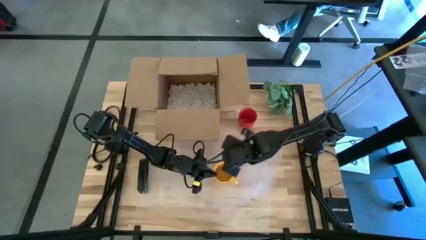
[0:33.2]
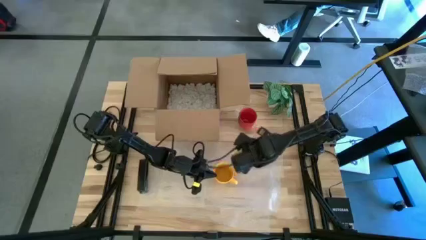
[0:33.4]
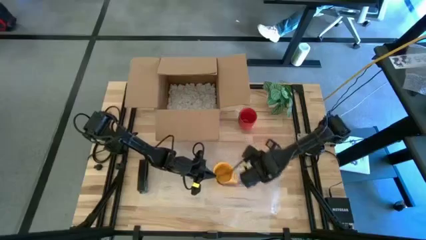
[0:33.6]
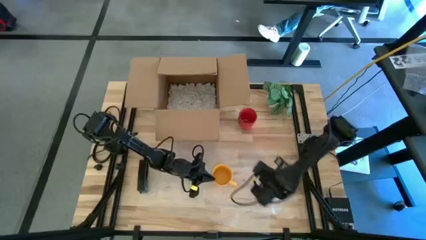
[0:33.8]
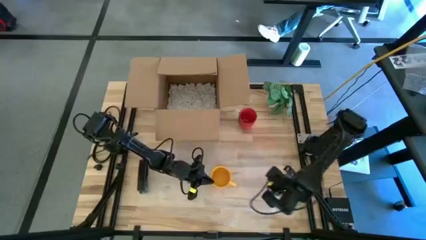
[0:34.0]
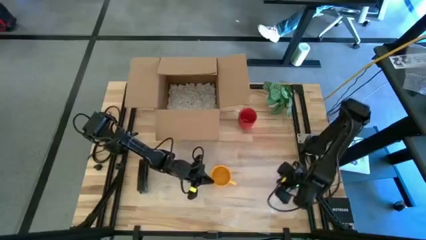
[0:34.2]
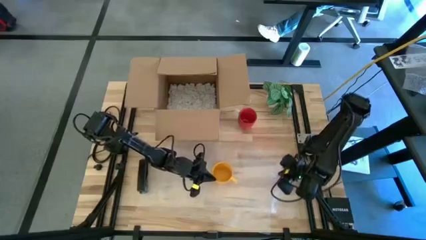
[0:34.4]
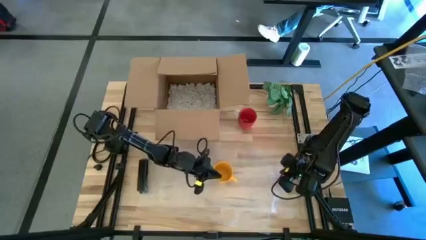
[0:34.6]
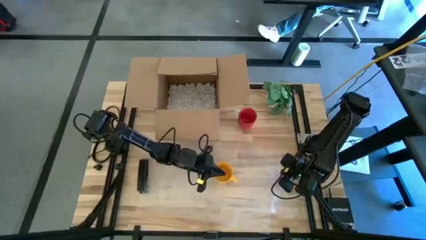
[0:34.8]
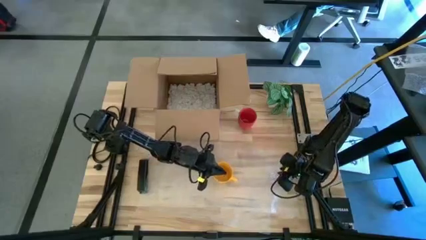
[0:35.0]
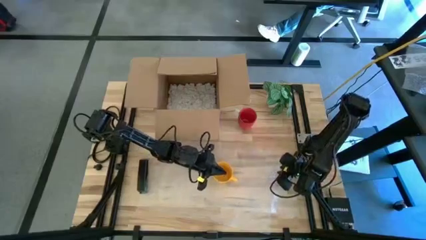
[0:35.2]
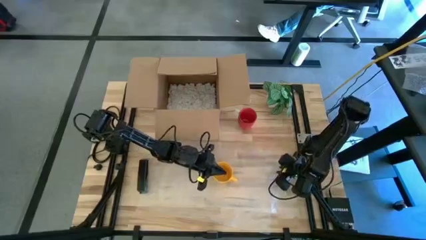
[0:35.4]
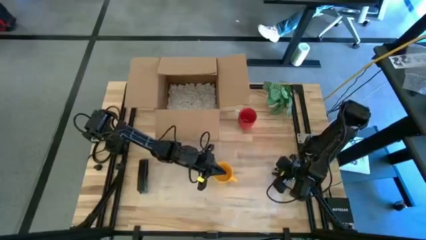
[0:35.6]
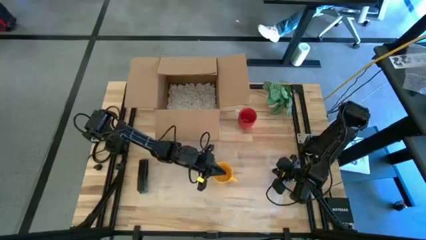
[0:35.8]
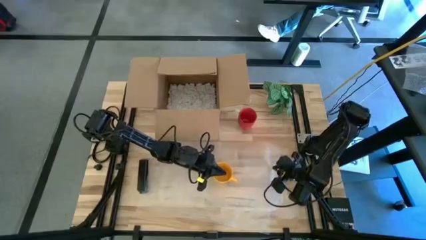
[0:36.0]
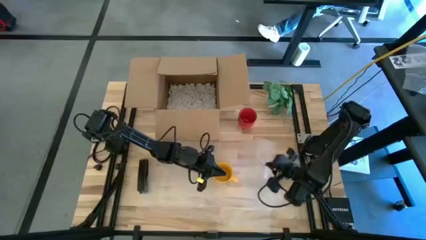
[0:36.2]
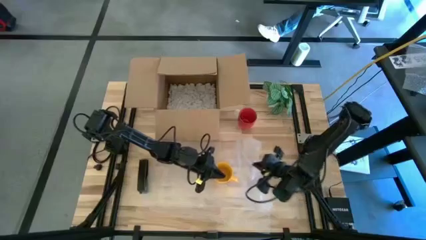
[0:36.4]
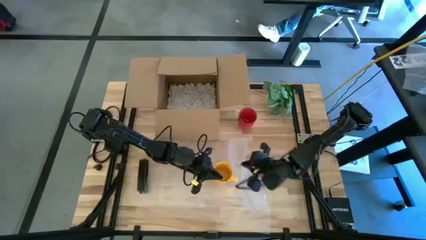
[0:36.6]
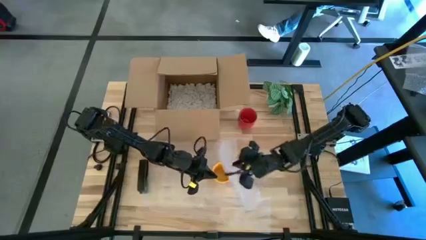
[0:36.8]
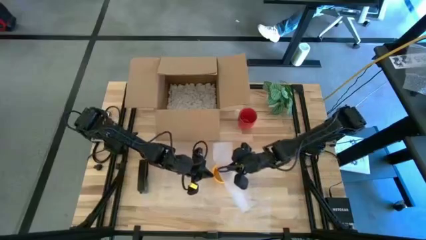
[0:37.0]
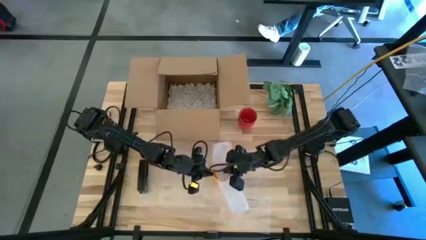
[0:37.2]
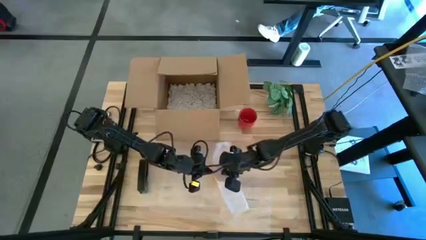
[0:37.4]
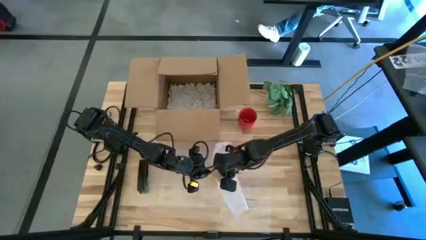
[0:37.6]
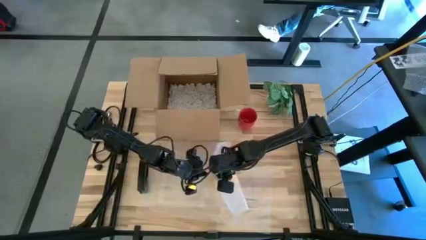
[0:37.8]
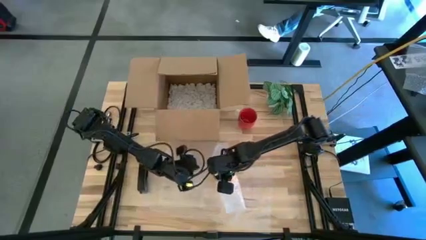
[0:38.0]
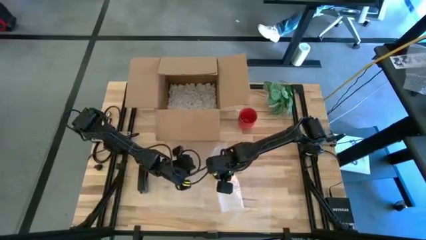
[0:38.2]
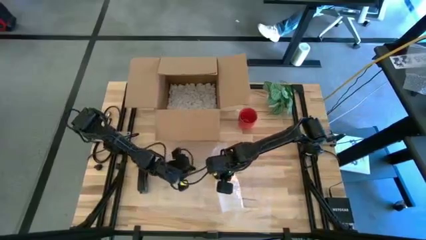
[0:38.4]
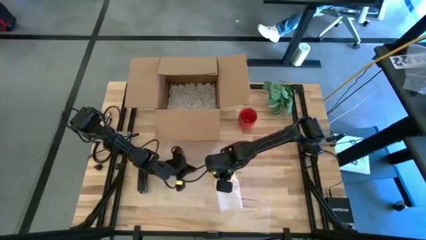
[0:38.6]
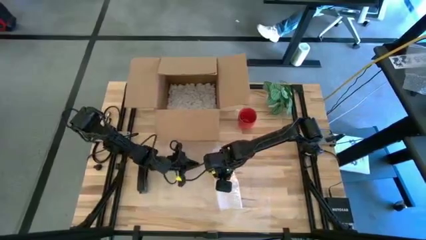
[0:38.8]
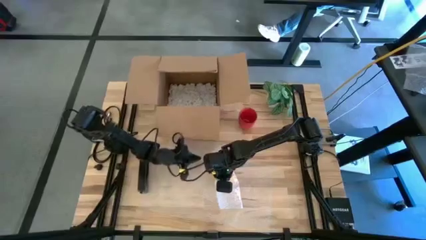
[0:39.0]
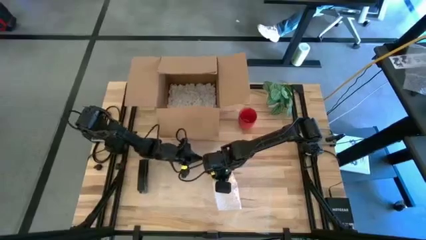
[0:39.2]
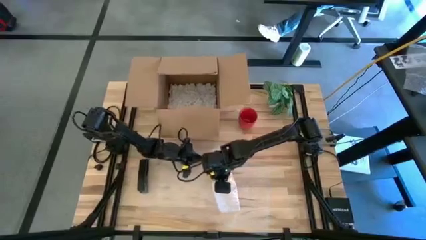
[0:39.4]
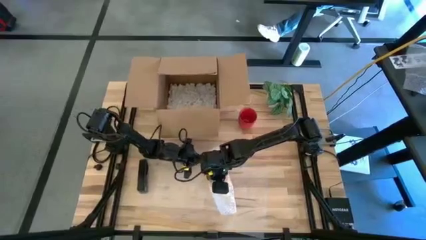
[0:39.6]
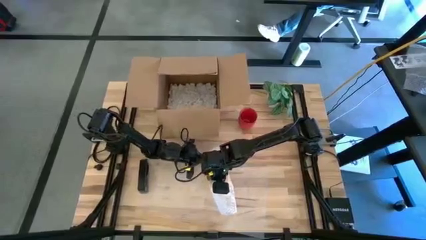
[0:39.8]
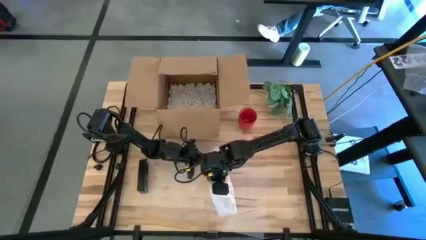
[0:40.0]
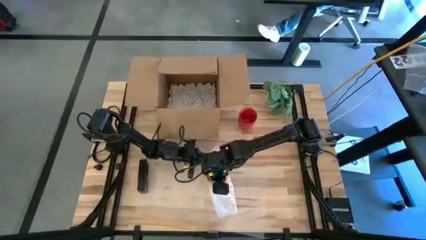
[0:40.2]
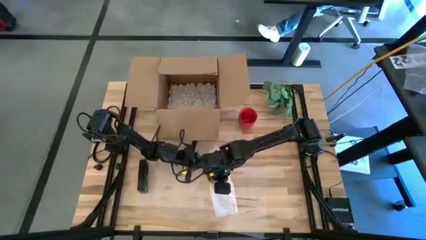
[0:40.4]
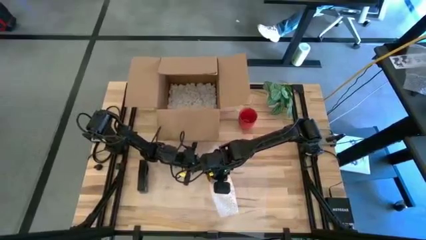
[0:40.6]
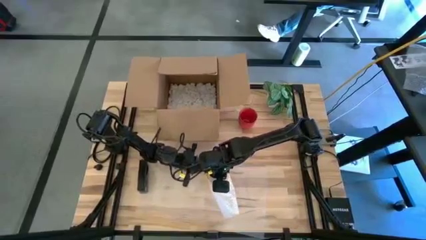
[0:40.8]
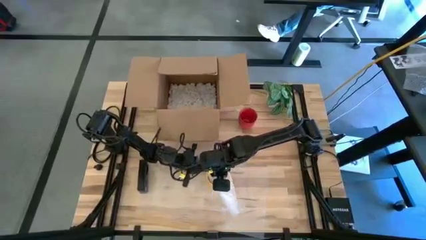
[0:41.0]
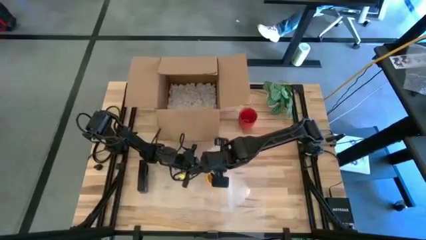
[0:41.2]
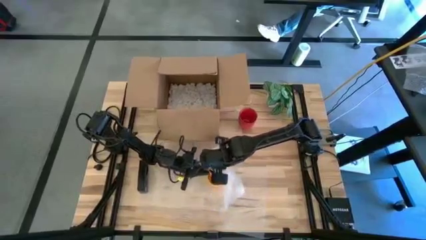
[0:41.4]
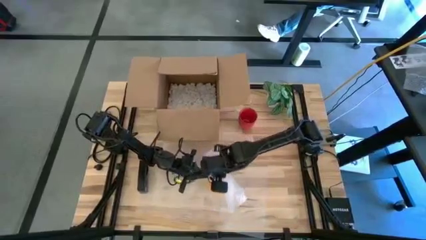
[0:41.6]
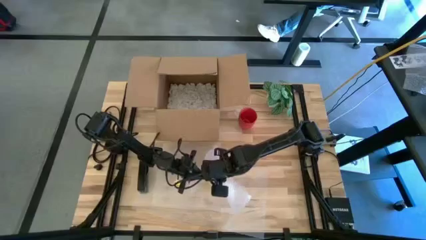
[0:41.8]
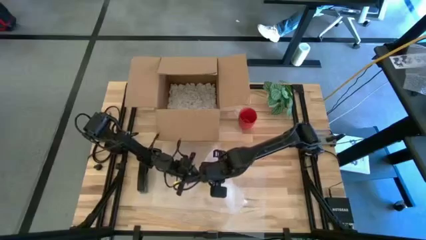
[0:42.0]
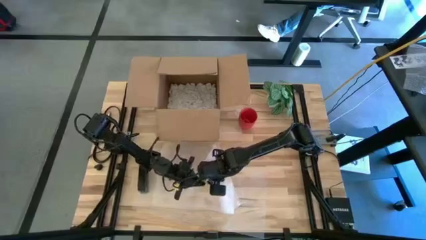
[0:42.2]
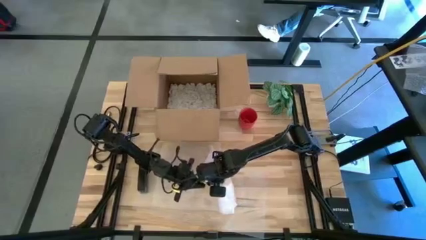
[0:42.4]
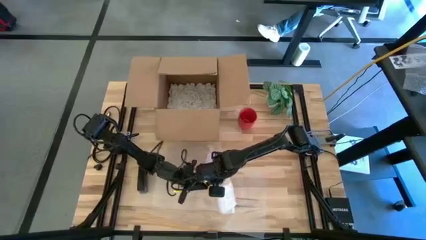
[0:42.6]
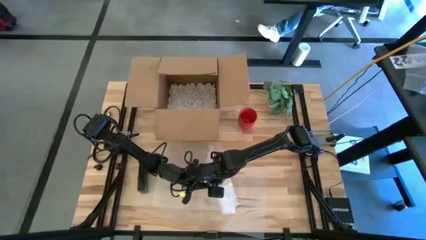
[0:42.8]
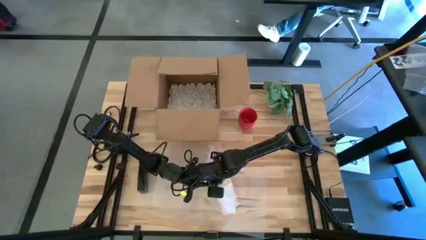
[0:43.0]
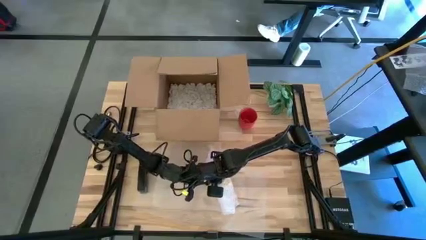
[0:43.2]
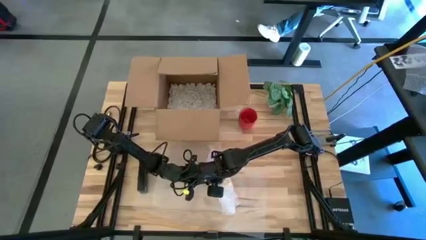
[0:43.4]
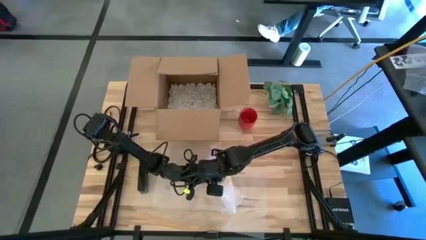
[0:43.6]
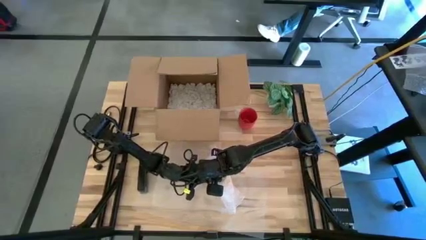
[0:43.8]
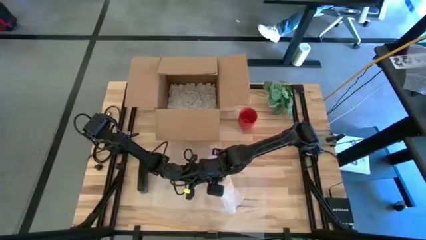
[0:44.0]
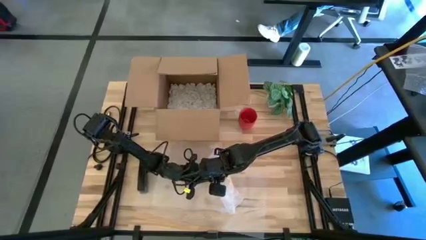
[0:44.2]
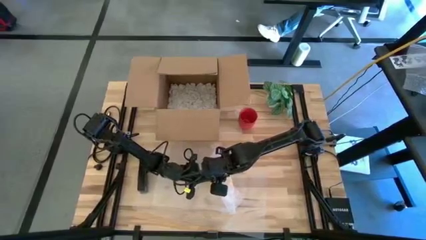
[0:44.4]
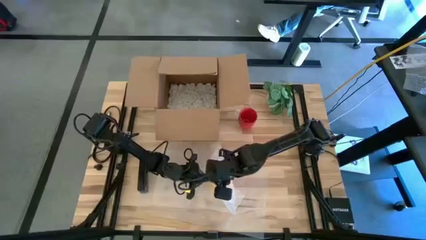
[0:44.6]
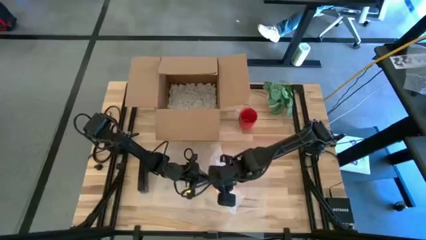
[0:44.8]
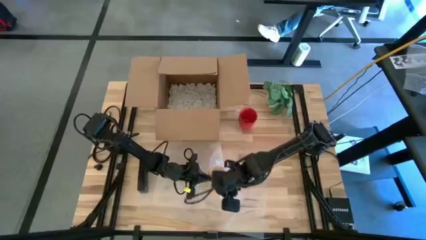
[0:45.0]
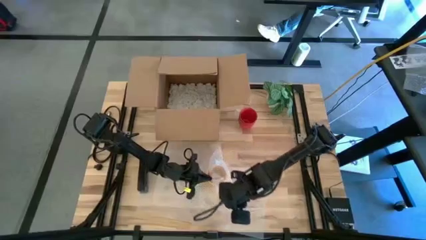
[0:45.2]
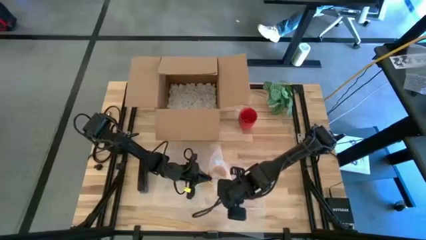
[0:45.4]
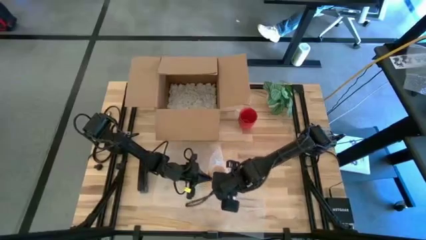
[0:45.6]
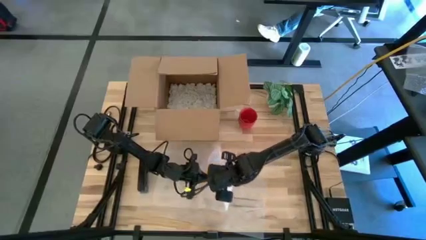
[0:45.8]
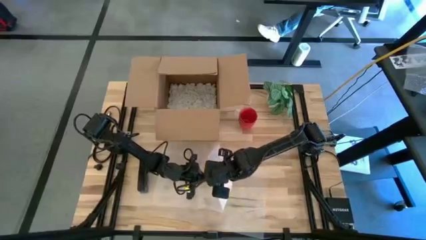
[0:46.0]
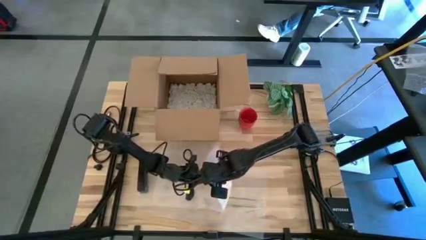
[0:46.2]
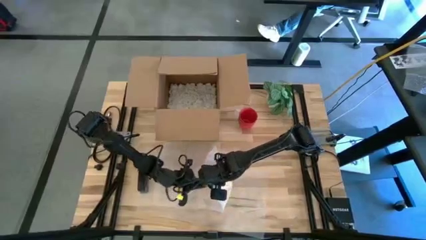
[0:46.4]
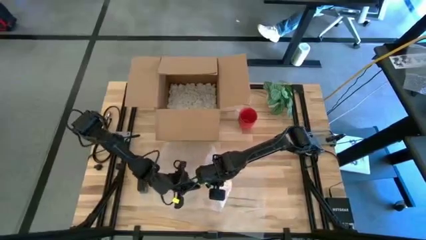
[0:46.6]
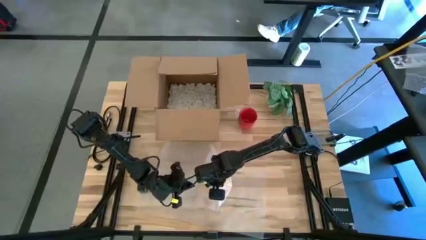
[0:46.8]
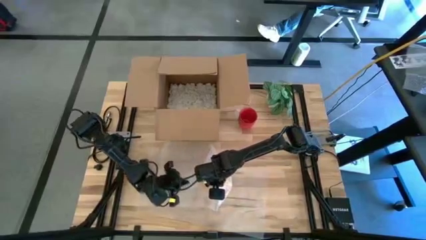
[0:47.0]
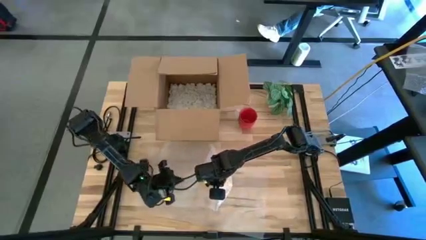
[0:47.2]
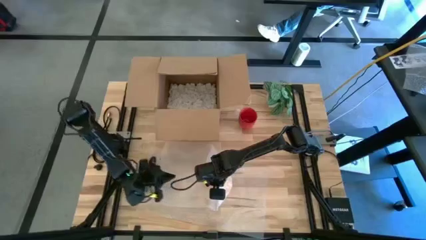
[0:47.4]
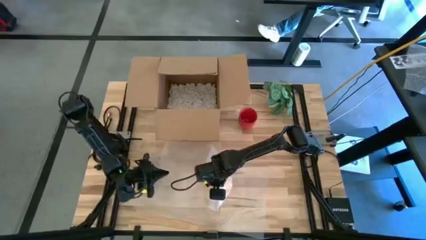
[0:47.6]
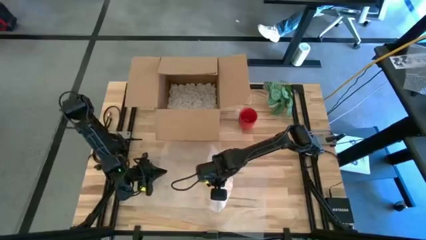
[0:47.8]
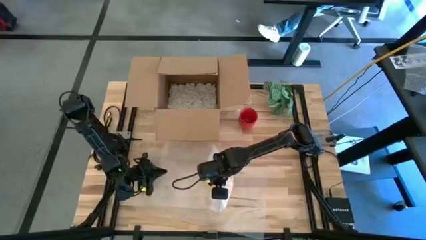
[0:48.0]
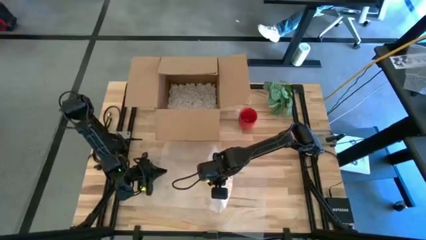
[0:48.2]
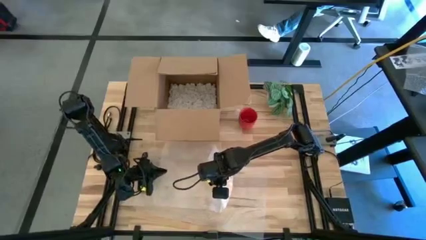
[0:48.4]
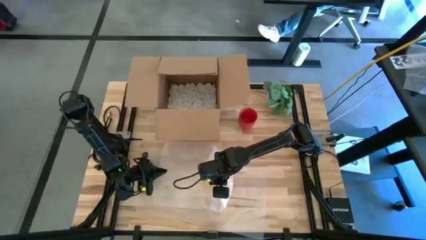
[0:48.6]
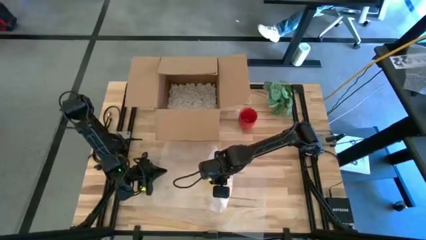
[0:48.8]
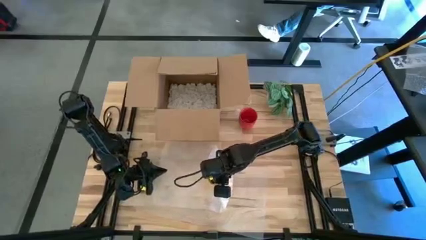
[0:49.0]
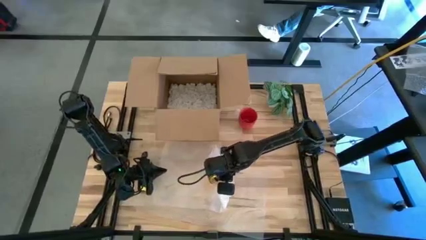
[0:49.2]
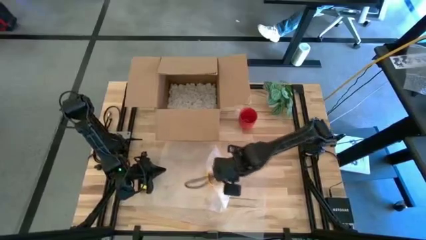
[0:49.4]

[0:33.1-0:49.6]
Task: wrap mug
Wrap the yellow mug with bubble wrap

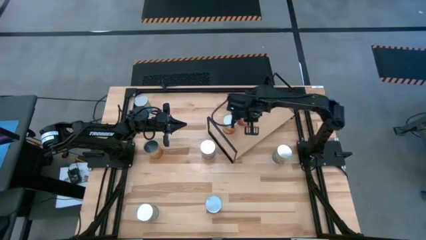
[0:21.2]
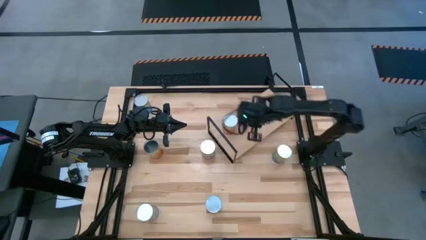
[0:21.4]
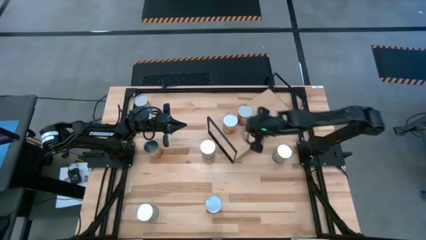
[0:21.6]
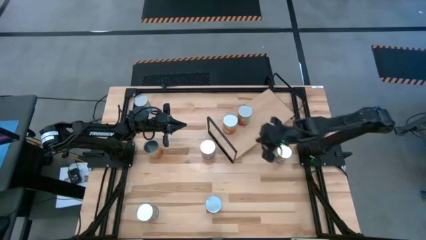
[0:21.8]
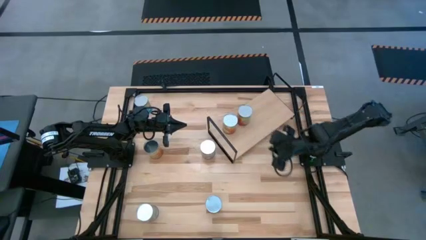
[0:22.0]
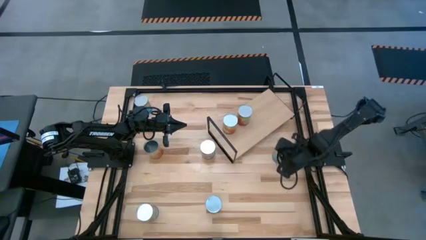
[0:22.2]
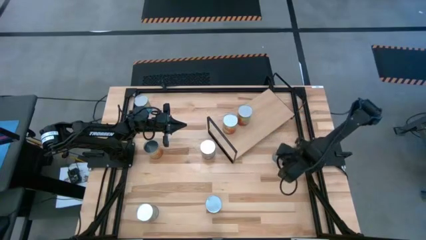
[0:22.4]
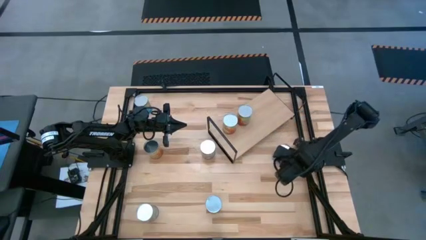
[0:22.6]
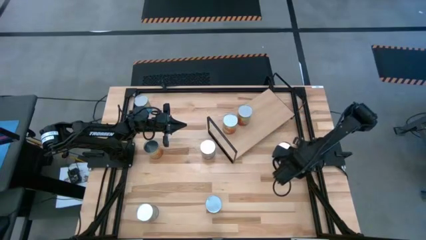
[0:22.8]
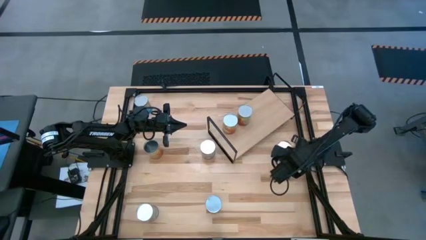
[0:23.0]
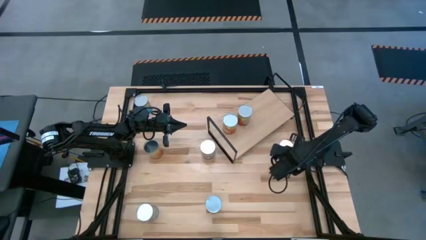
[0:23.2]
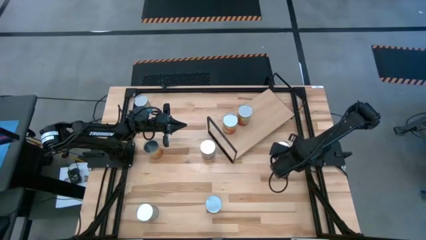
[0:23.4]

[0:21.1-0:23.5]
Task: Pick and place cans onto a shelf
Put the bottom canned tomatoes on the shelf
